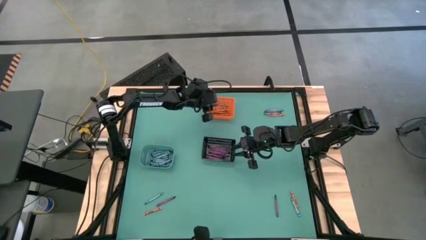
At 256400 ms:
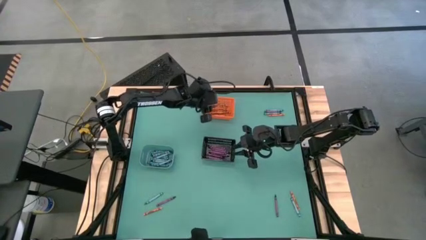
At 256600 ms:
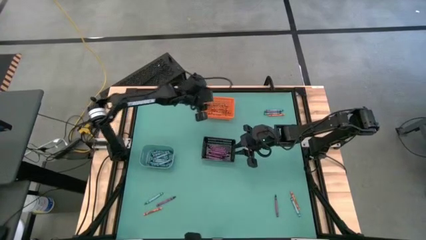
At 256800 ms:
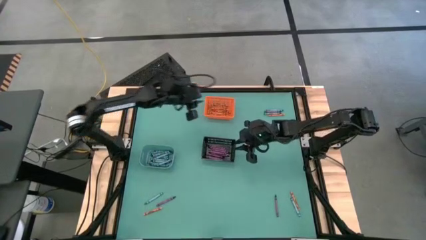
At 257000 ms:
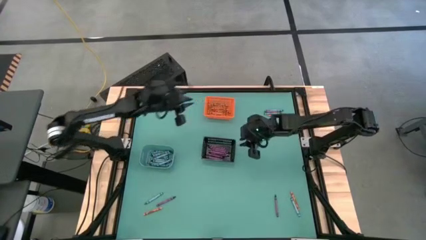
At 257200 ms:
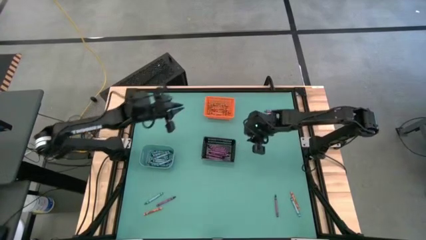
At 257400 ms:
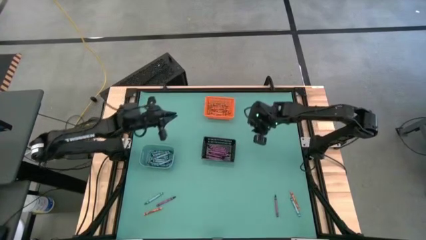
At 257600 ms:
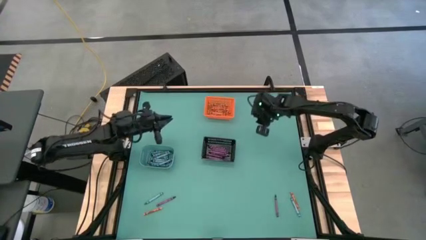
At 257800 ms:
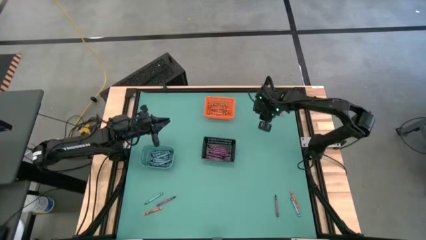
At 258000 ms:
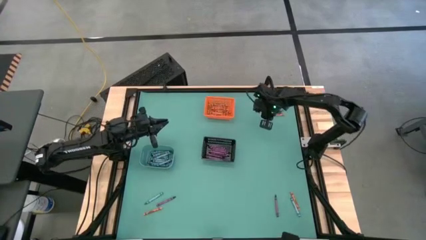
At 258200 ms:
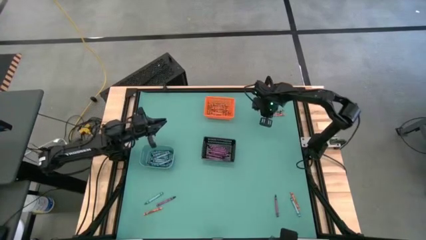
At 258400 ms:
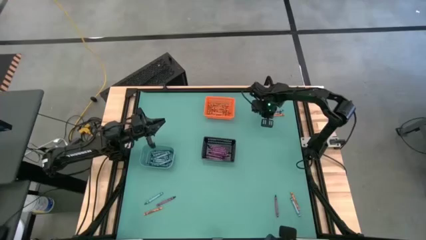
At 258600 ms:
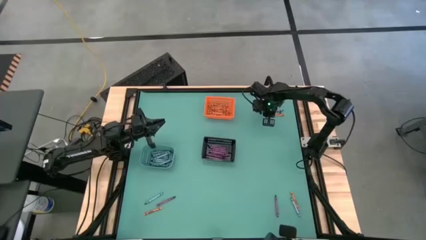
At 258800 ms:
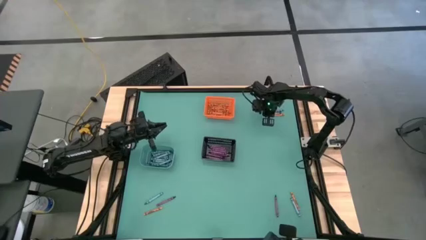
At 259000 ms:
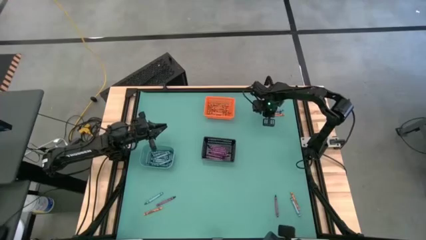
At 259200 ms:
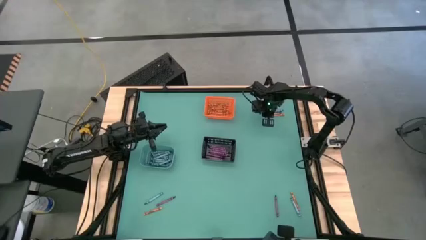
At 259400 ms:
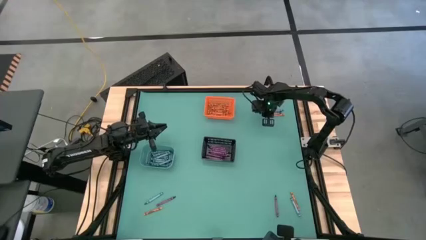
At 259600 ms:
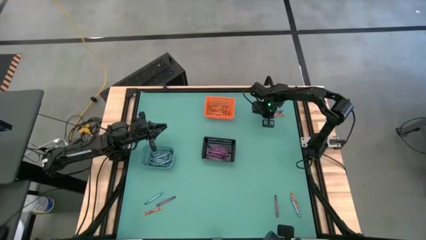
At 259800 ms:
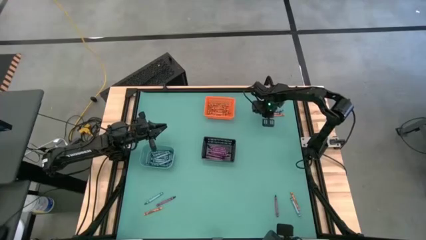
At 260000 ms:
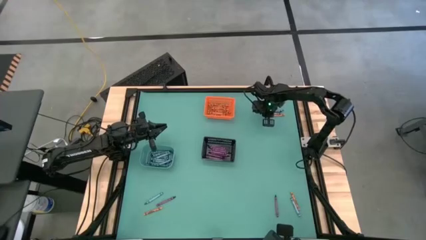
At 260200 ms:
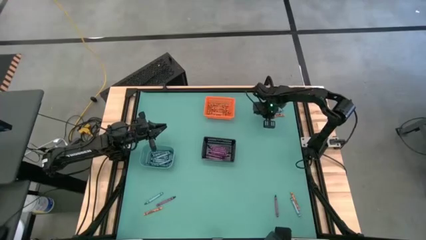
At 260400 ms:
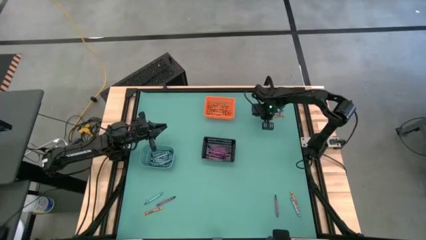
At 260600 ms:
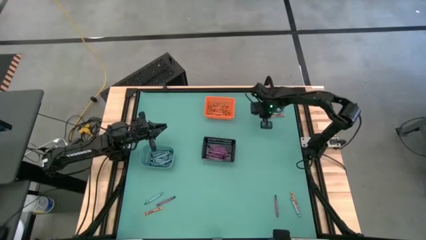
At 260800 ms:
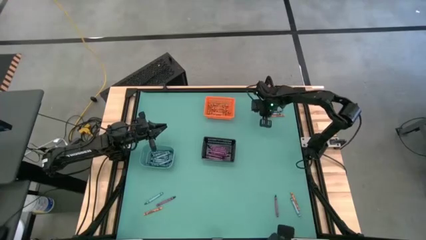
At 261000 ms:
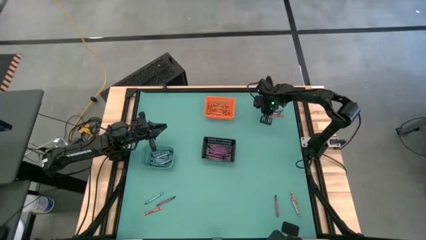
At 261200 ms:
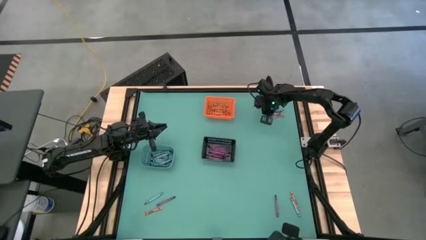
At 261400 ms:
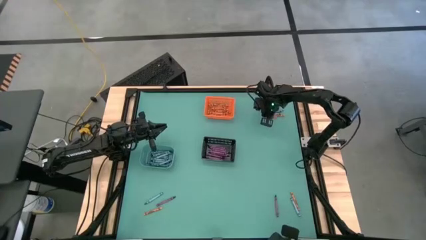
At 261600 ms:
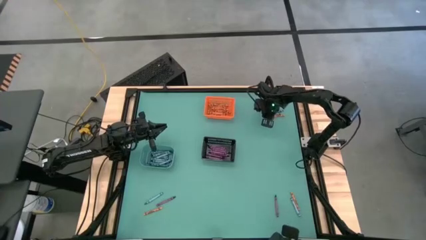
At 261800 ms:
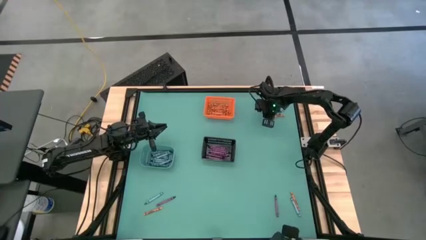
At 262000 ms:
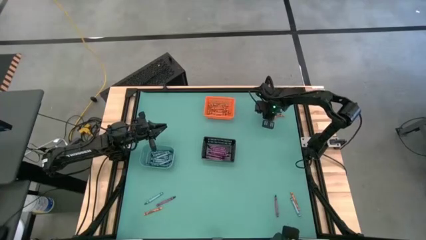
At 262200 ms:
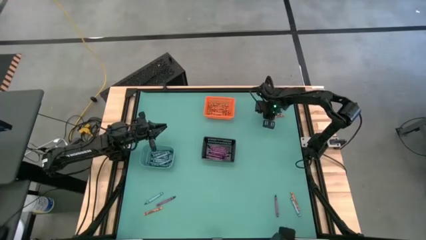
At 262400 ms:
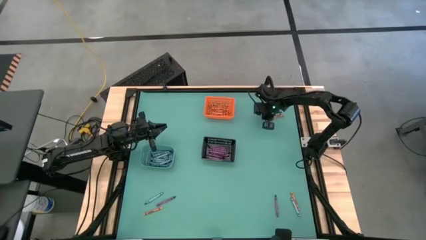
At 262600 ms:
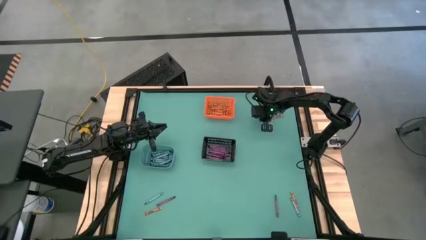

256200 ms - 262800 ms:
Task: Sort crayons
Put the blue crayon into the light blue bin

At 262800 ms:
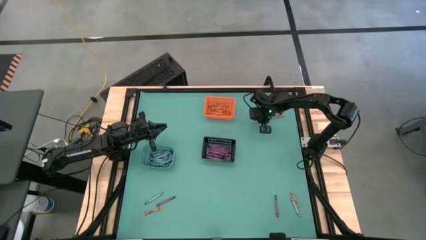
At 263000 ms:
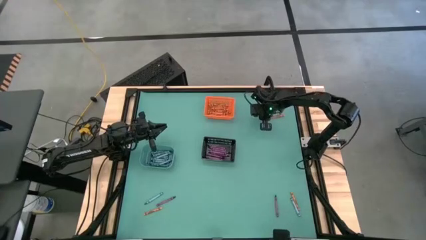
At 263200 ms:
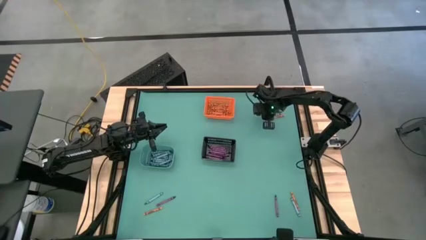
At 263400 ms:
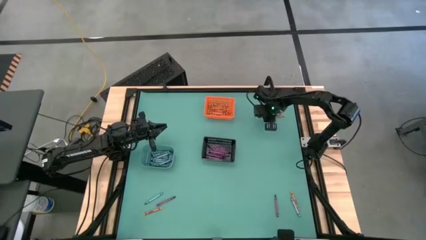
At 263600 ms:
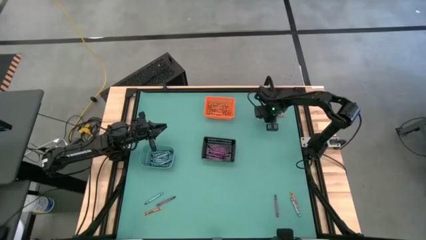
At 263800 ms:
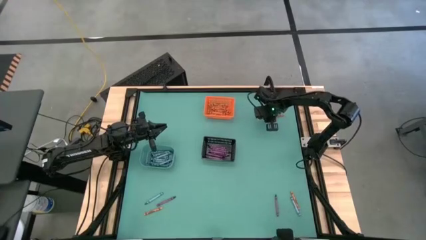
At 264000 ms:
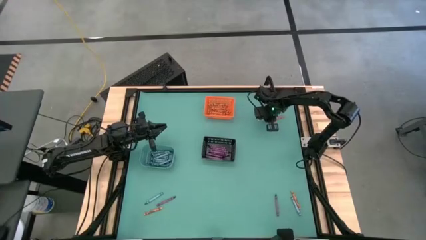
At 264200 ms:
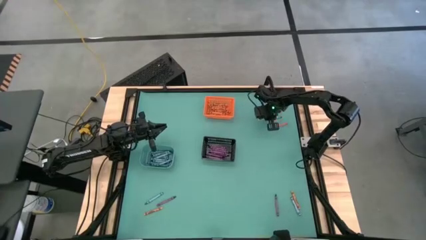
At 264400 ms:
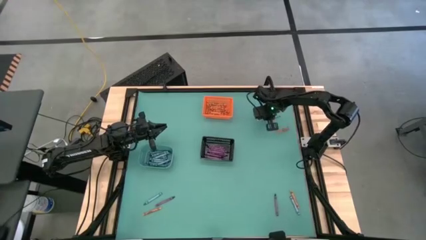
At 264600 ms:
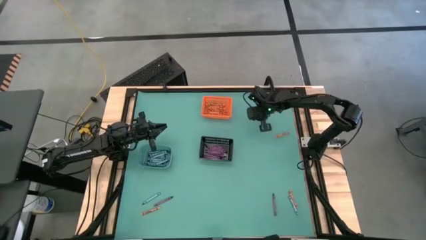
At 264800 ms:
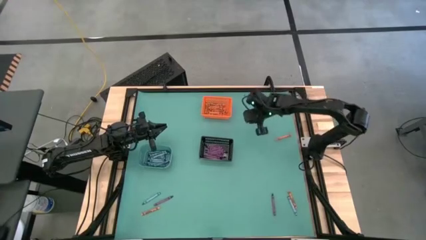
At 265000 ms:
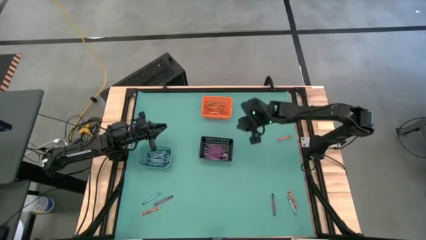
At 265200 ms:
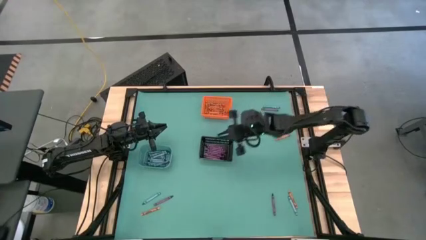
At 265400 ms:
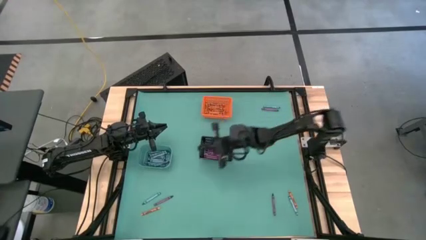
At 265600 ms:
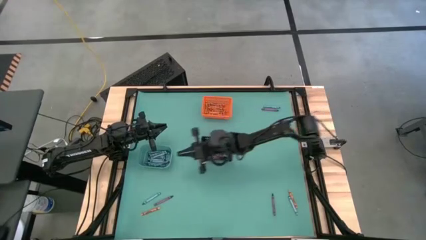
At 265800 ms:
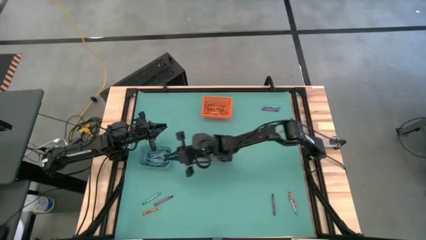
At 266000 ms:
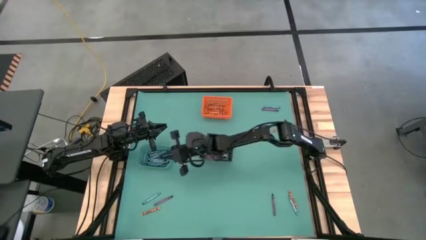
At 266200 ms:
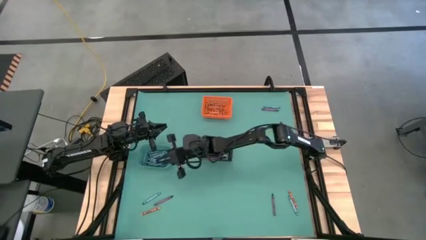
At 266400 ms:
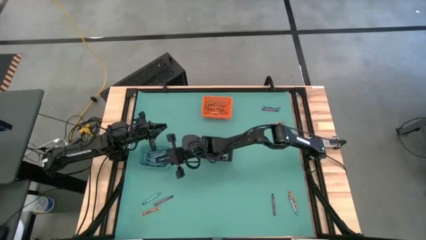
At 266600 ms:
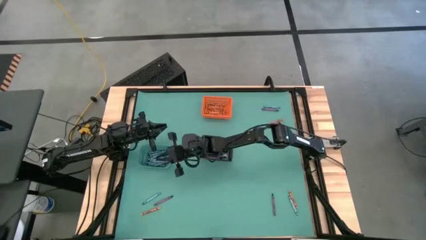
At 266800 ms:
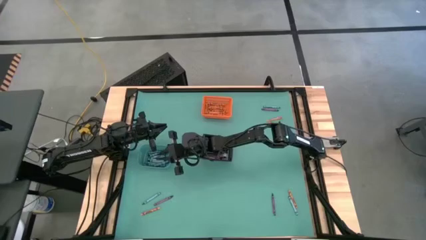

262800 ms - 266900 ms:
Put the blue crayon into the light blue bin

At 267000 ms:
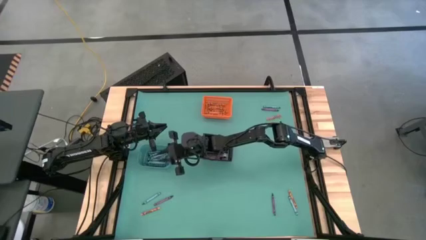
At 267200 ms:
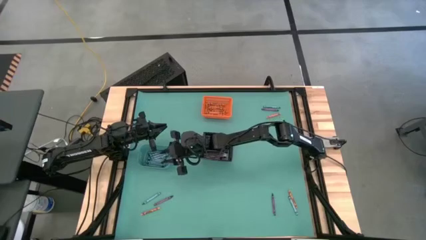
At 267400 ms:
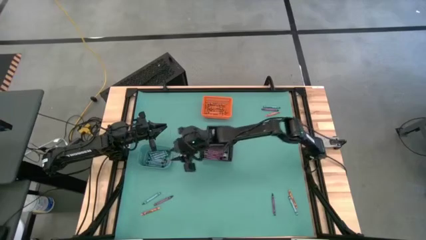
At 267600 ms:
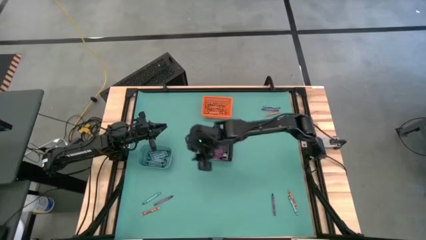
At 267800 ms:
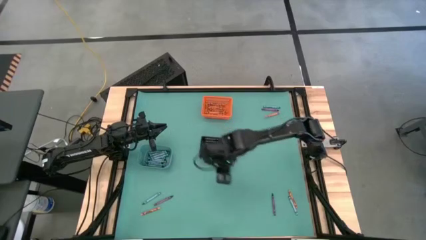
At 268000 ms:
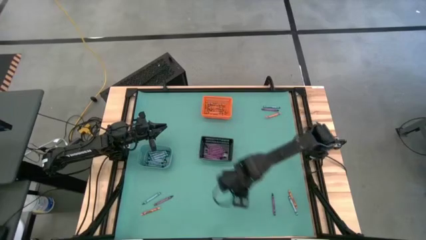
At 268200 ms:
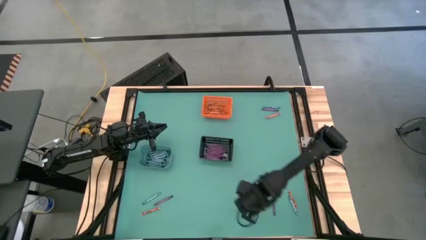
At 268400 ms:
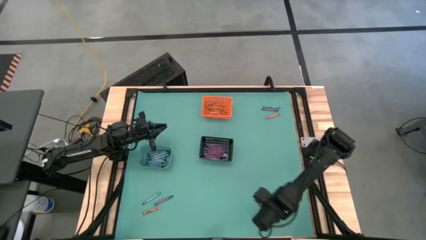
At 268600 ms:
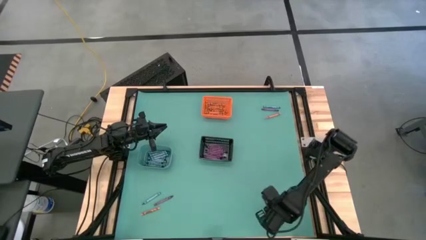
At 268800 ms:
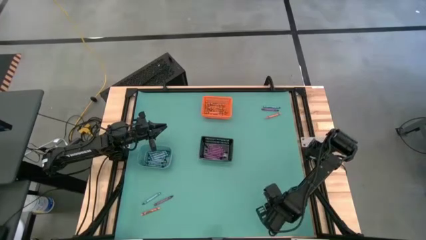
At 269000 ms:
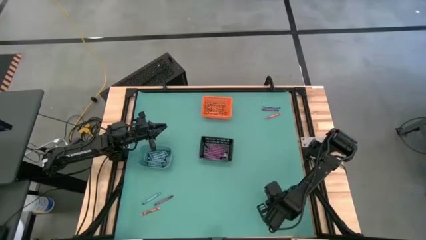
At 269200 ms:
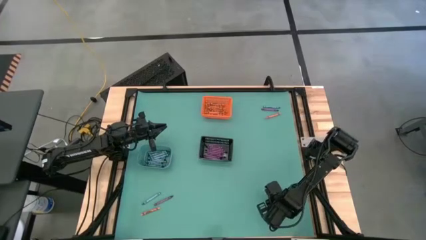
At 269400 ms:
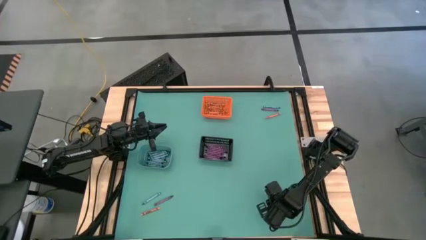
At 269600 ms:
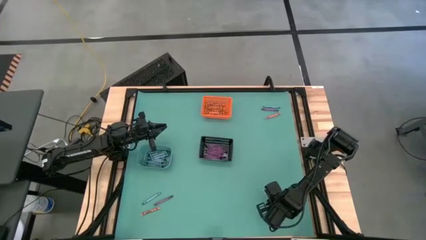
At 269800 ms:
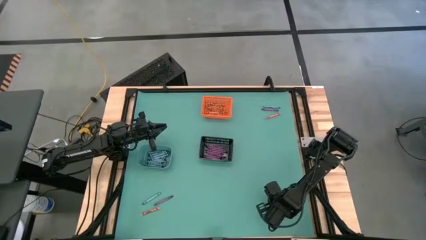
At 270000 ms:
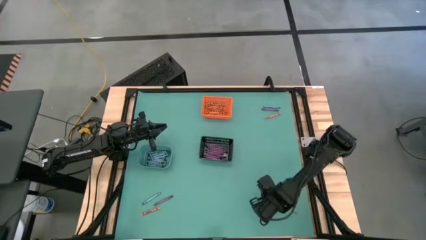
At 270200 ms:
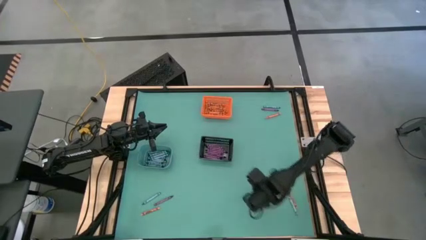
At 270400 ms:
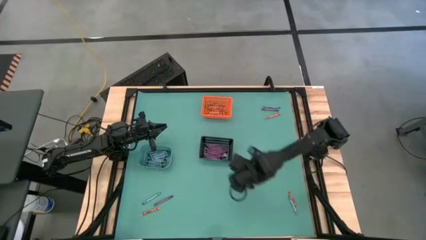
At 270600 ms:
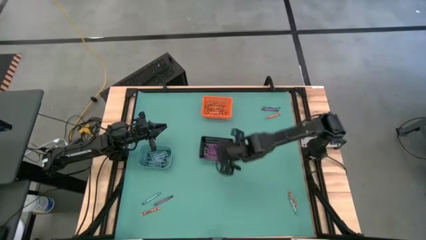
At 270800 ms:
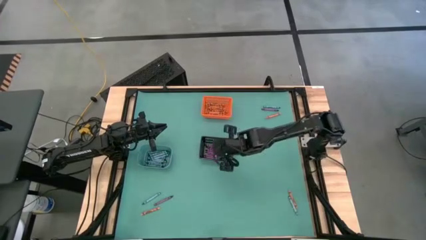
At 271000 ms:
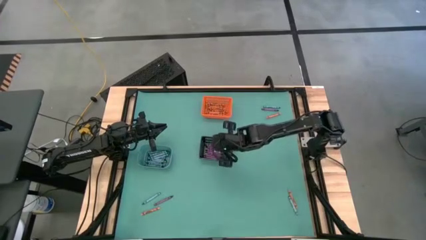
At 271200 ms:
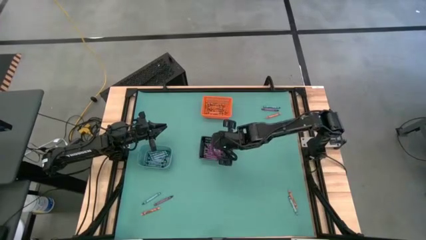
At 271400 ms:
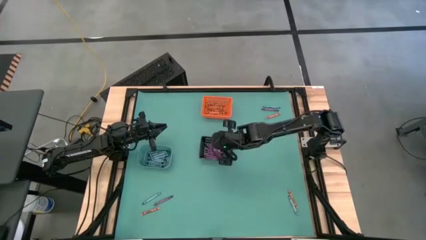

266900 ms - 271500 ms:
Put the violet crayon into the black bin

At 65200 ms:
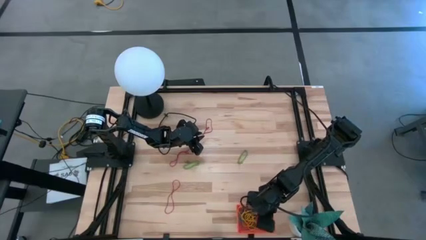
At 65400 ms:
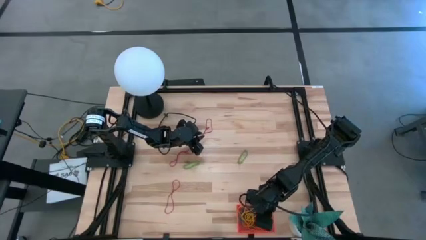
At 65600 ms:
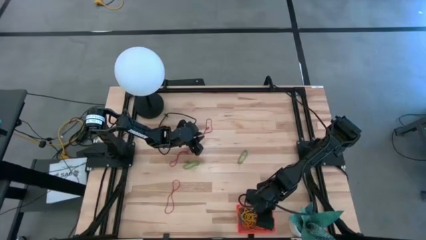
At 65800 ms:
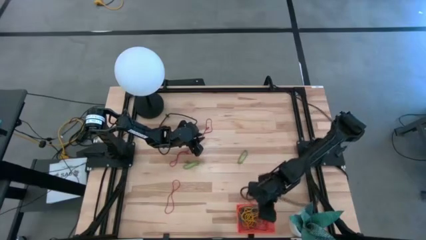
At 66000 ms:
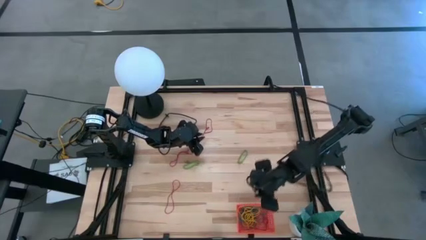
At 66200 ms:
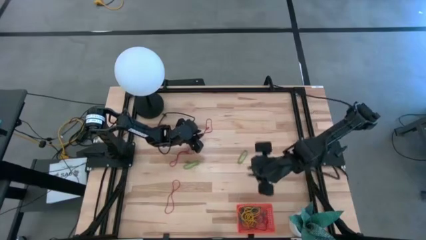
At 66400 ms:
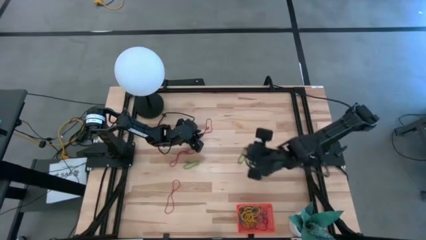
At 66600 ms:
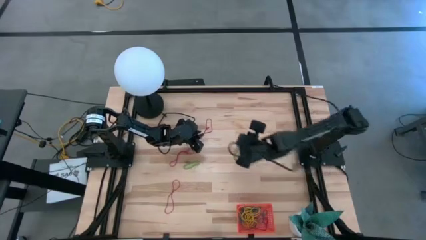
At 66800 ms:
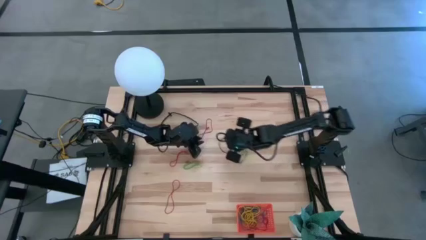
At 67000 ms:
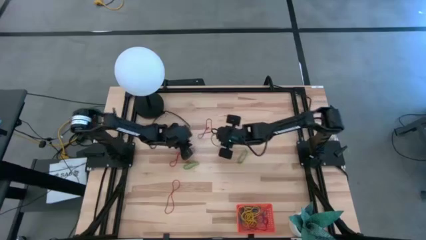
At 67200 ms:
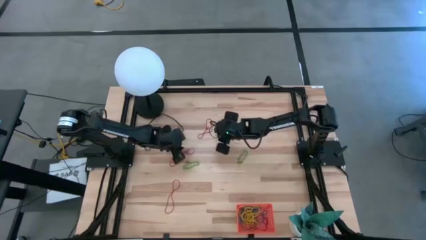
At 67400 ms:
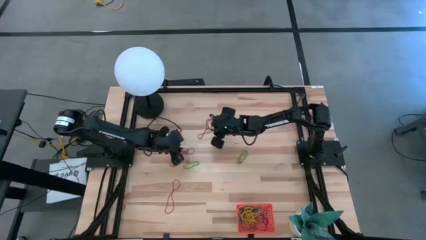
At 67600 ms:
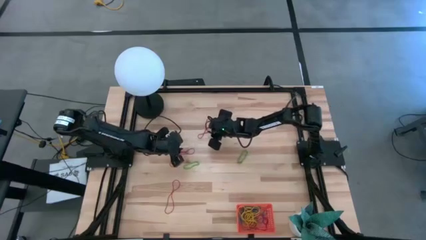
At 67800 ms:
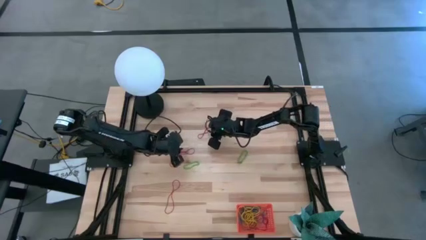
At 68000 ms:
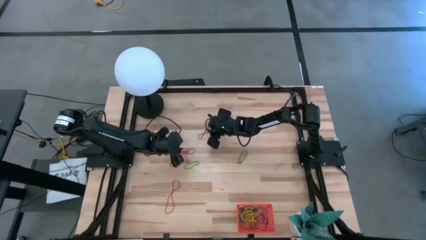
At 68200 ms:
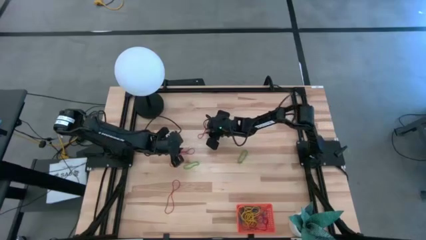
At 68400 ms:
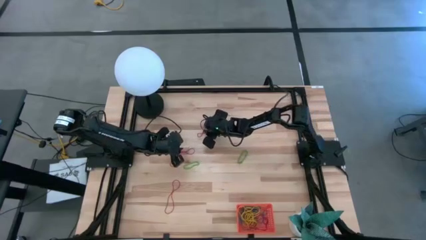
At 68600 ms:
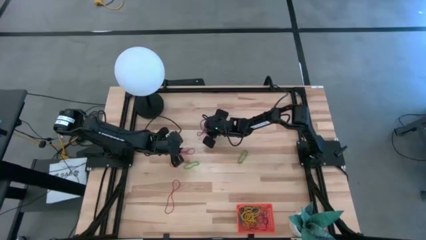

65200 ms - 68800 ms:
Task: Pick and place items into bin
Put the red rubber band into the orange bin
